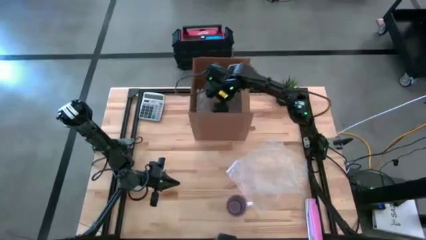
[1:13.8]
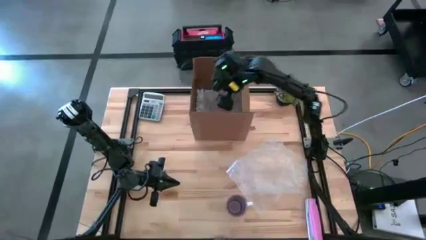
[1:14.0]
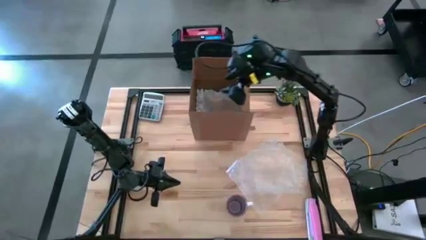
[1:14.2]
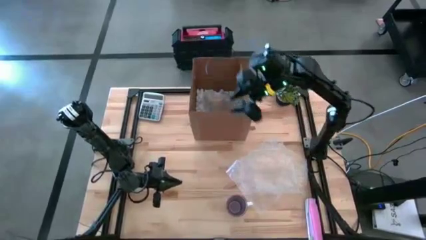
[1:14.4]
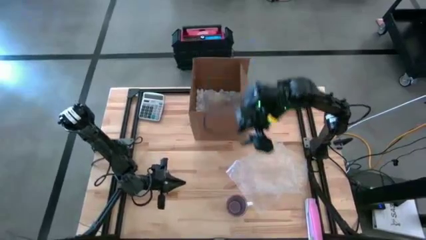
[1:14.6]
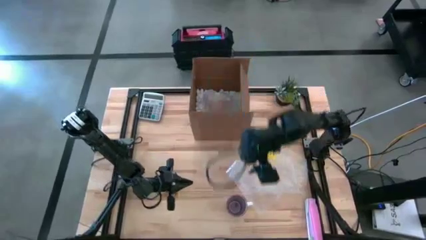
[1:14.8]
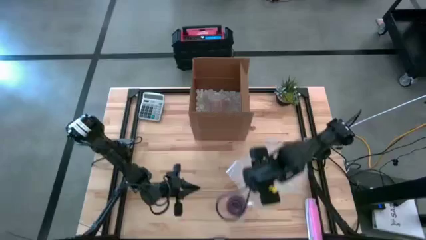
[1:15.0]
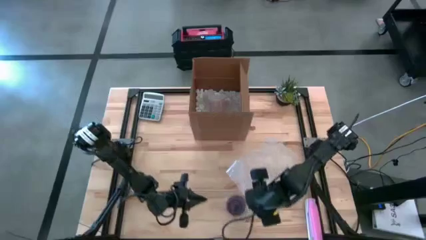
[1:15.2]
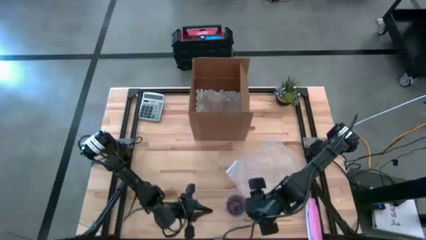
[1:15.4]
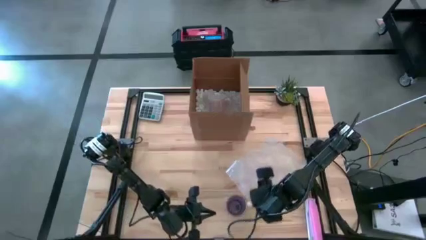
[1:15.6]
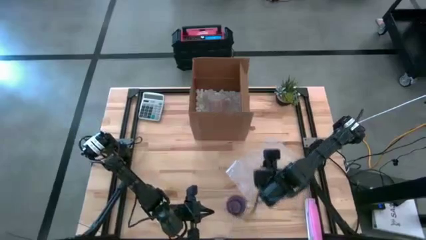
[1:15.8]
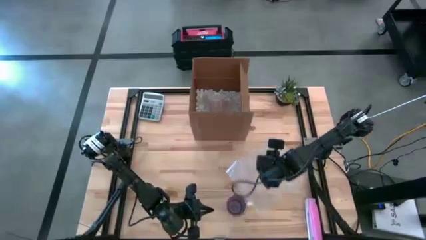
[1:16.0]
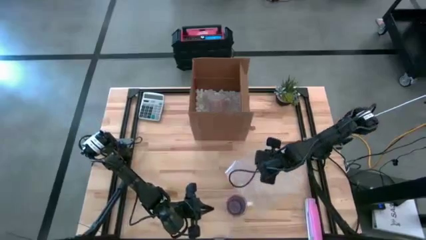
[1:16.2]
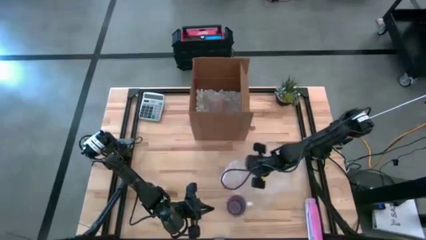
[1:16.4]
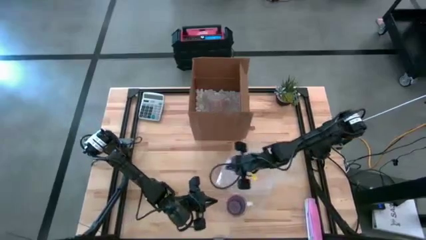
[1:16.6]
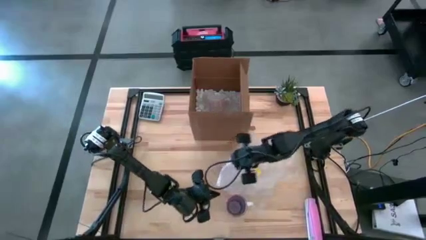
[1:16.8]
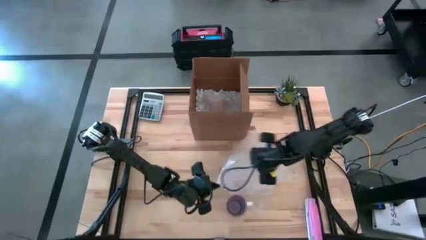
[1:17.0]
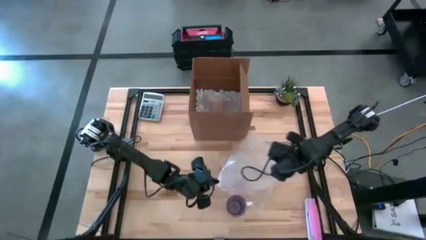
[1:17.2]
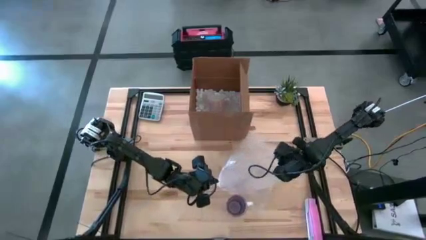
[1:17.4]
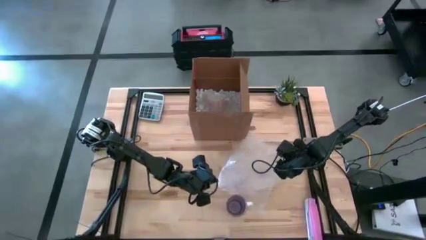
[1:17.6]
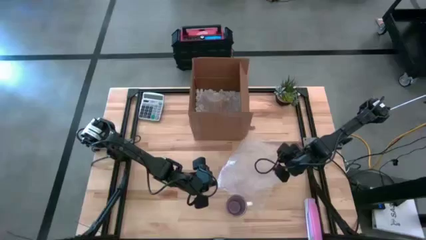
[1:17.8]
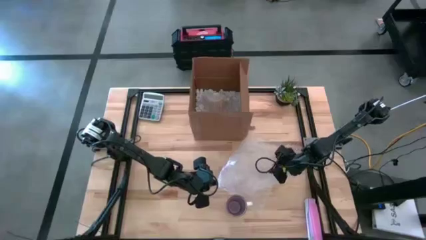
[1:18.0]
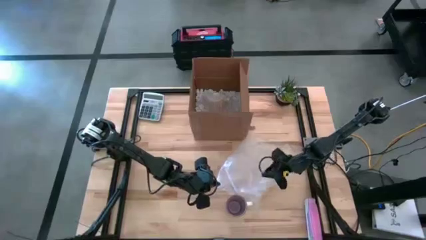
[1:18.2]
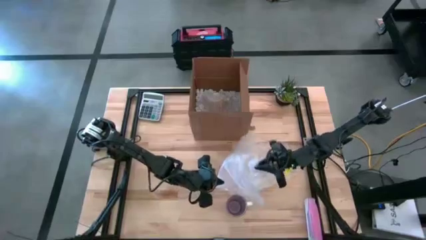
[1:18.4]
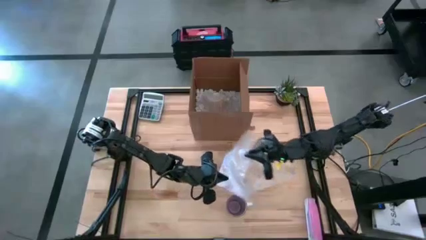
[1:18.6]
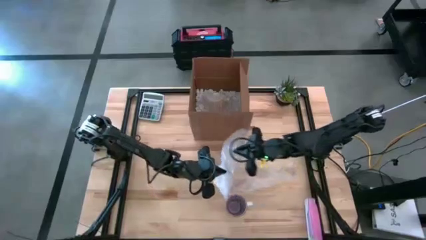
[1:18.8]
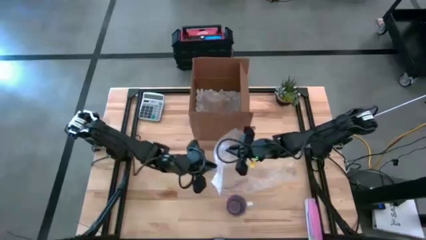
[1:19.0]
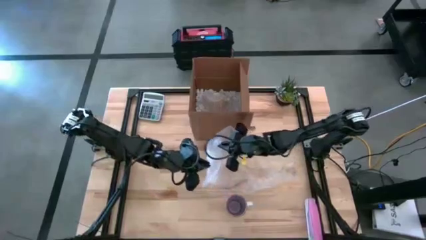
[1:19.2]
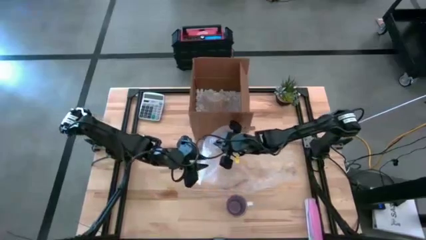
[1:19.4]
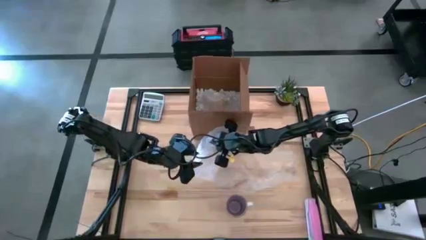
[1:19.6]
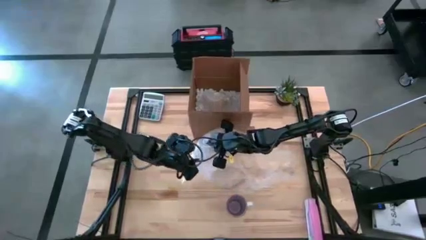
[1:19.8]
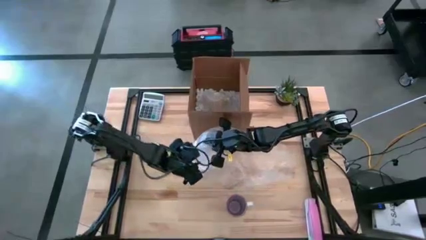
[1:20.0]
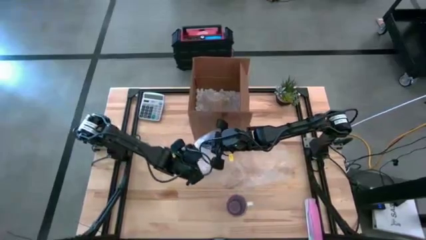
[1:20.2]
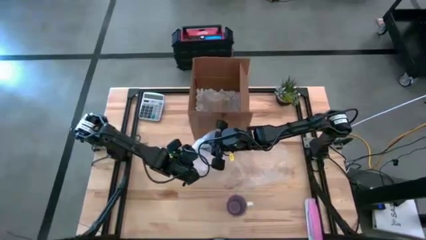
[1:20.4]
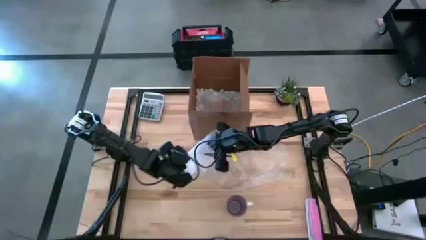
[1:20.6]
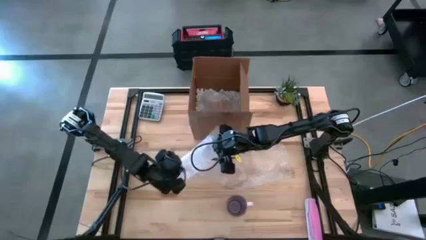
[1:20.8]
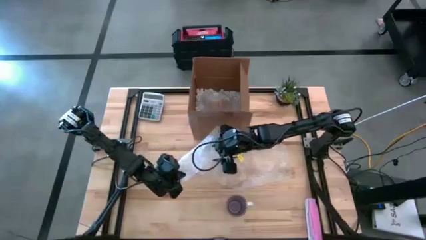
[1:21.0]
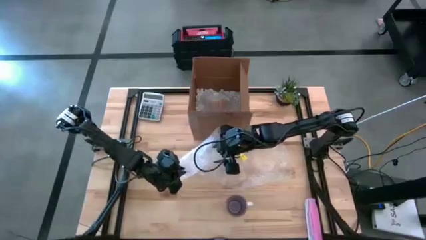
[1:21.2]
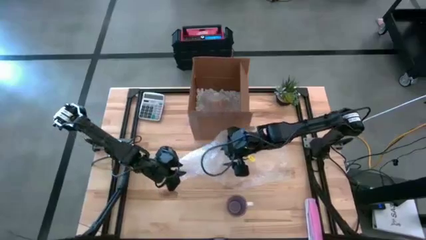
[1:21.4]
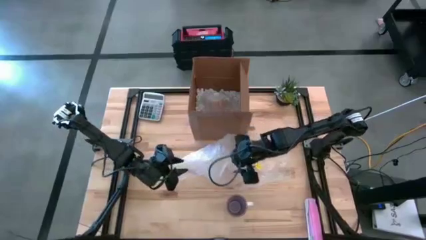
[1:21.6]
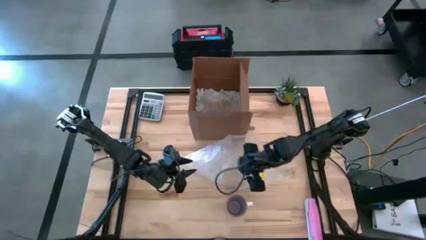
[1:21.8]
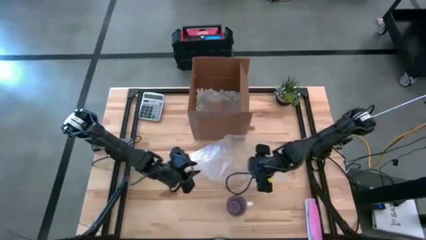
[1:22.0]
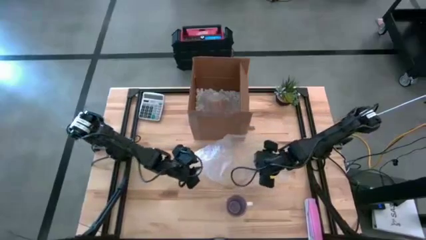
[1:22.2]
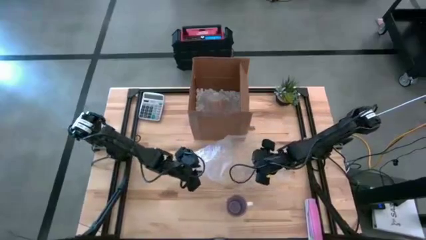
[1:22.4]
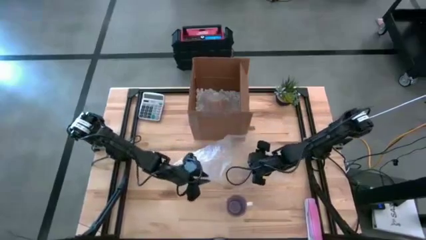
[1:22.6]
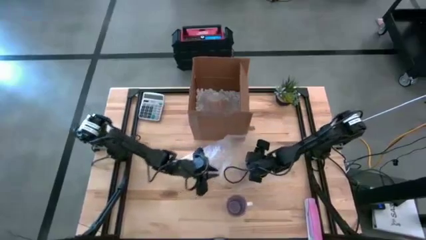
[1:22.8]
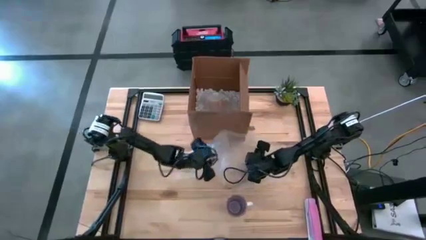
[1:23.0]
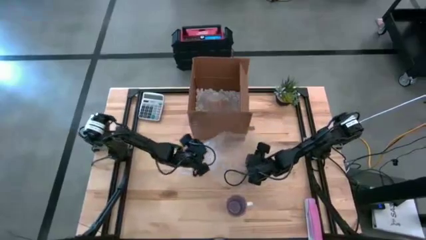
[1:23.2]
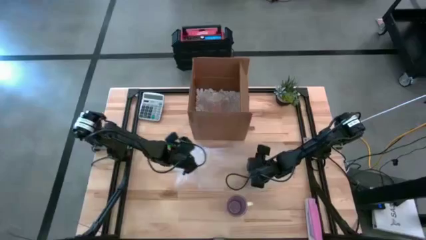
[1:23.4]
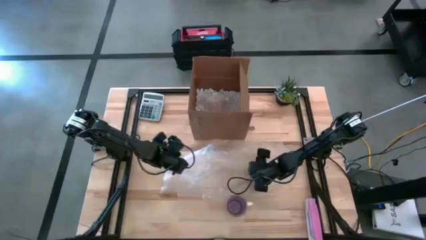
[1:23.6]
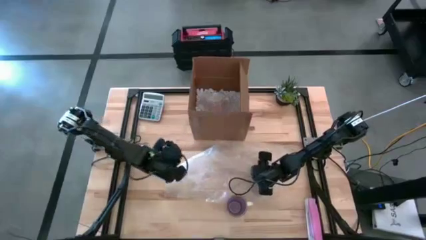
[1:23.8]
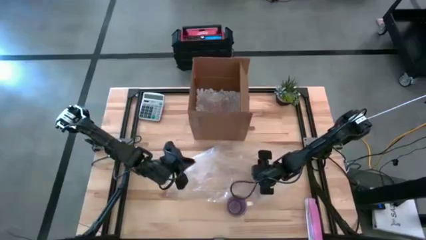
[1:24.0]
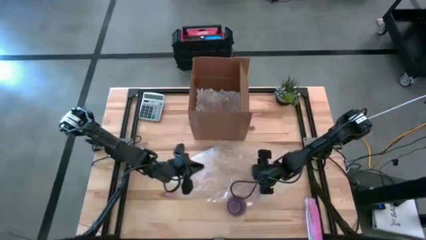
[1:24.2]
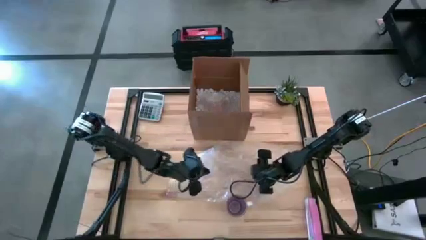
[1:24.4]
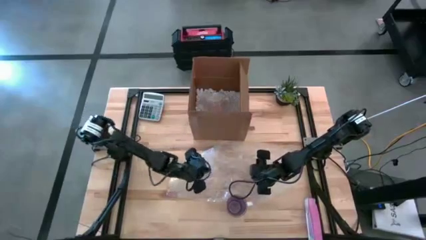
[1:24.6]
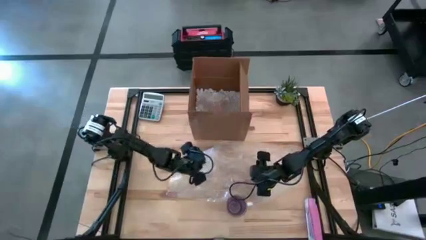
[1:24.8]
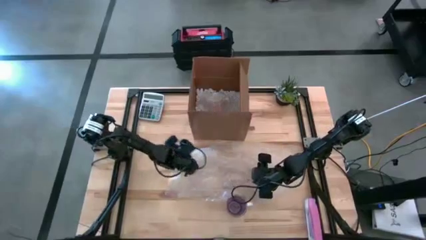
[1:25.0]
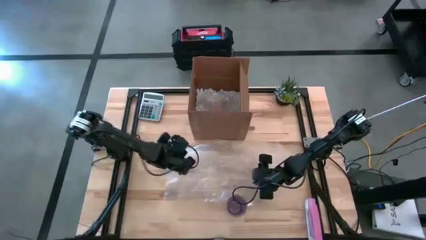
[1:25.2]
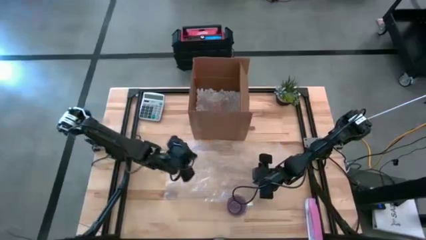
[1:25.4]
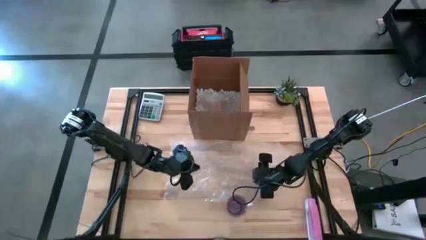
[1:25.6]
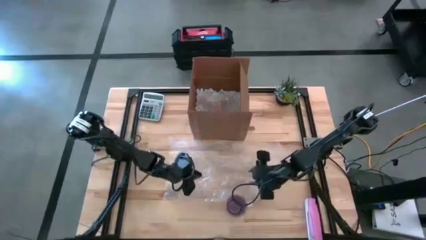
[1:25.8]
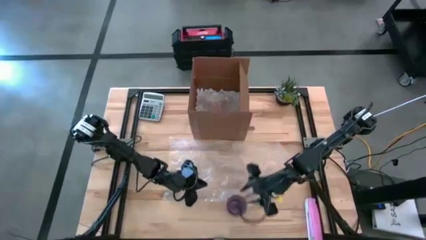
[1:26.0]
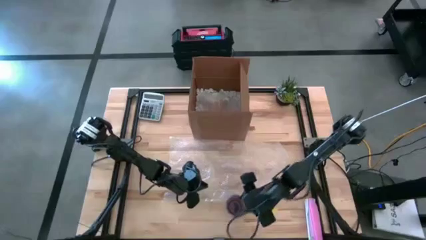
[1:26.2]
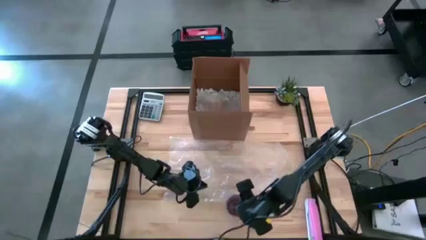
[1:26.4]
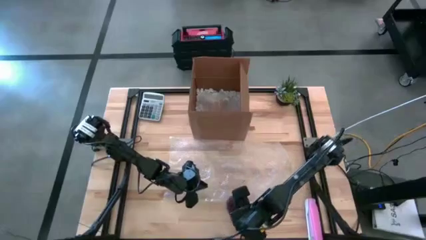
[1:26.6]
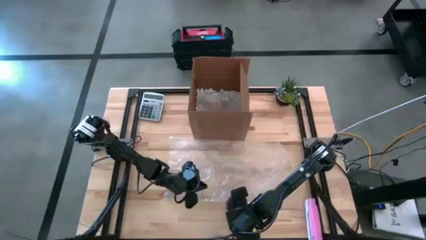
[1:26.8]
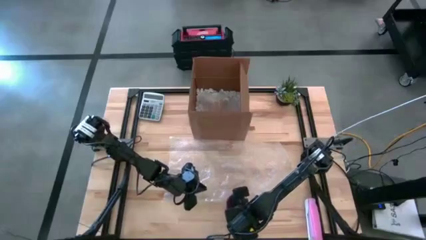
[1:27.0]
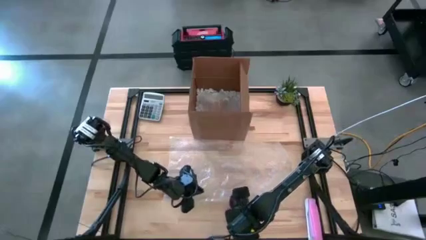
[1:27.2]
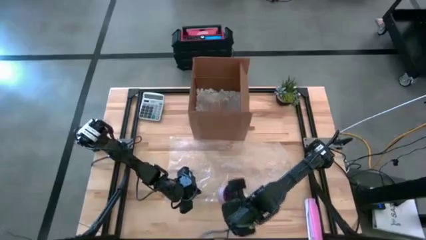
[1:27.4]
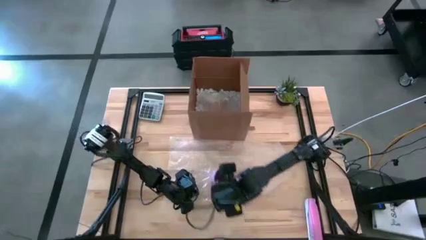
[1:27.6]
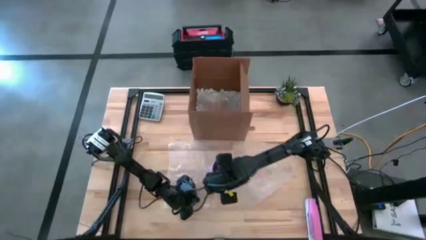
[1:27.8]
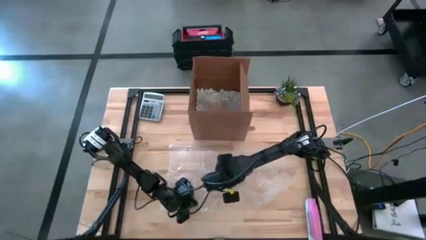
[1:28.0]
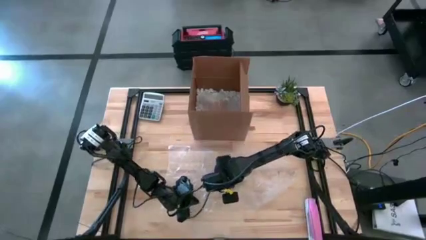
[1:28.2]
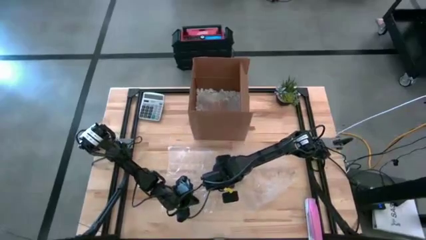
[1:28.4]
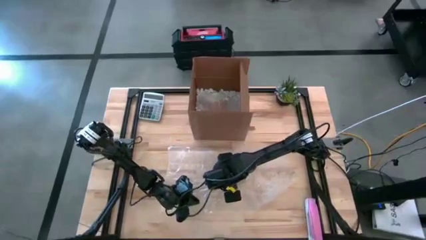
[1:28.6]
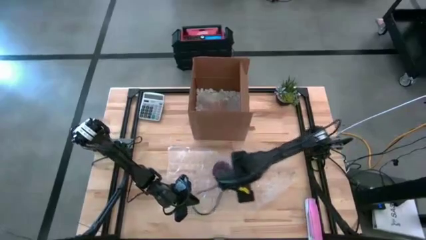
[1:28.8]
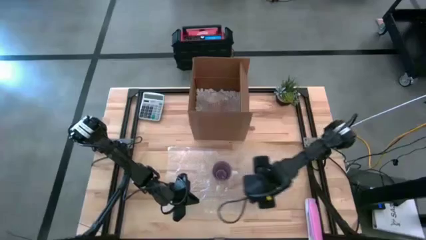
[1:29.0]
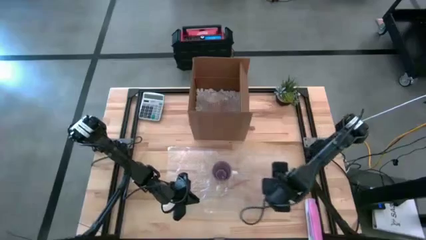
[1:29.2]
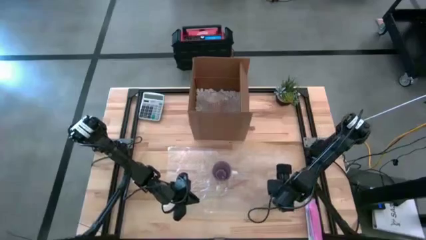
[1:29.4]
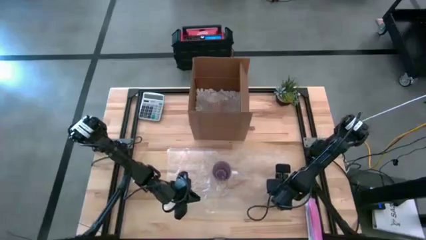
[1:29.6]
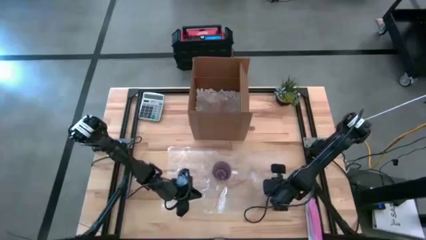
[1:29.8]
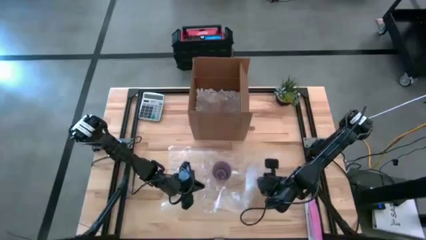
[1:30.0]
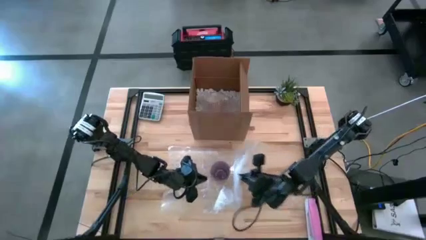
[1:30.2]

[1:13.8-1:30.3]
Task: wrap mug
Wrap the purple mug with bubble wrap
